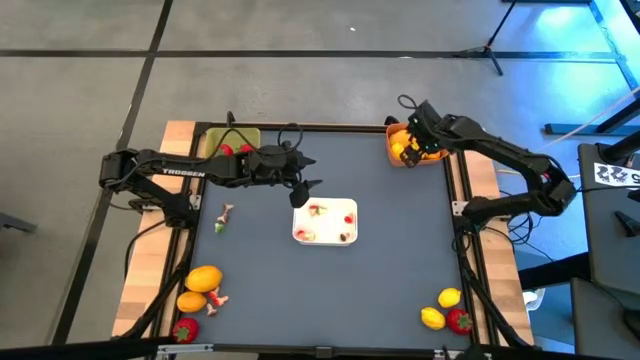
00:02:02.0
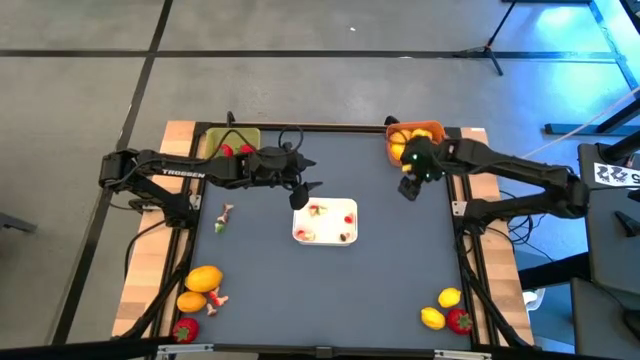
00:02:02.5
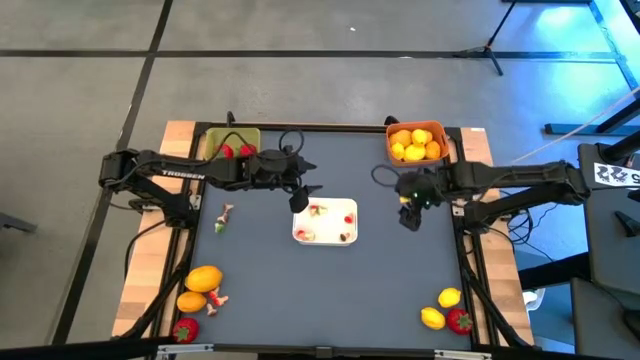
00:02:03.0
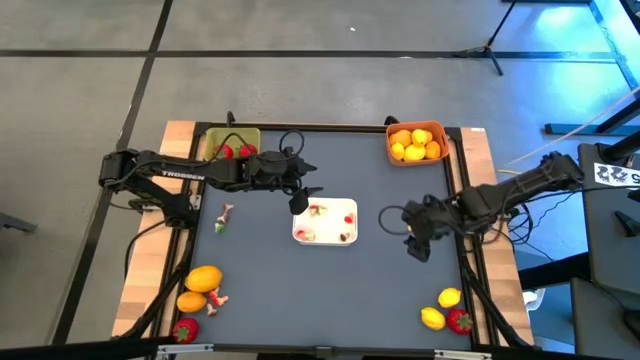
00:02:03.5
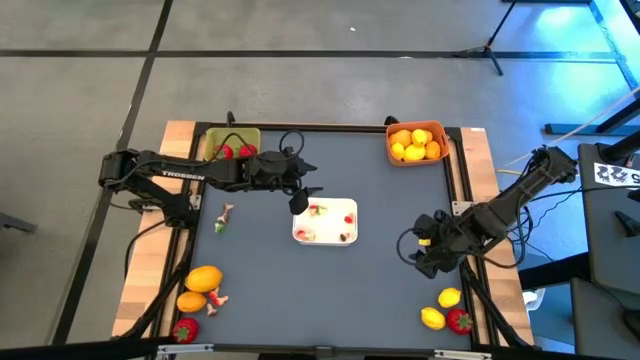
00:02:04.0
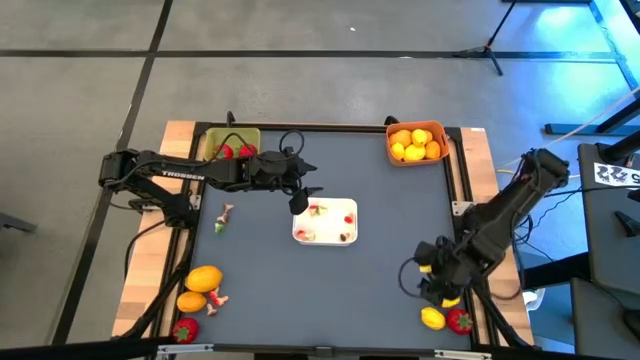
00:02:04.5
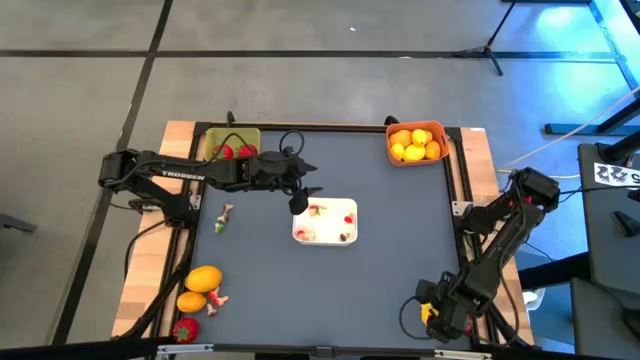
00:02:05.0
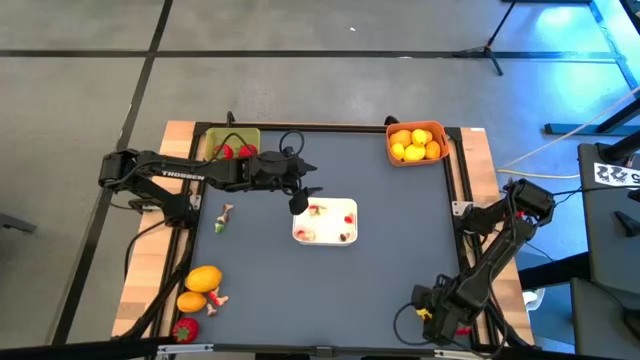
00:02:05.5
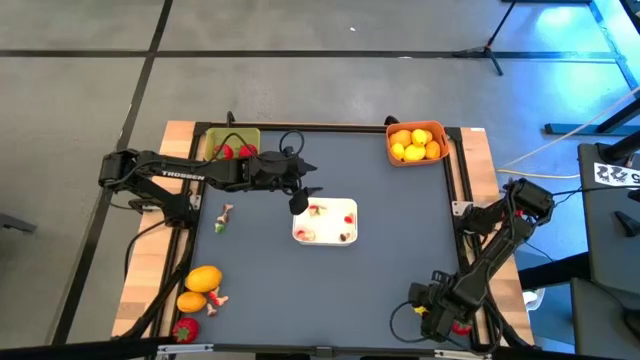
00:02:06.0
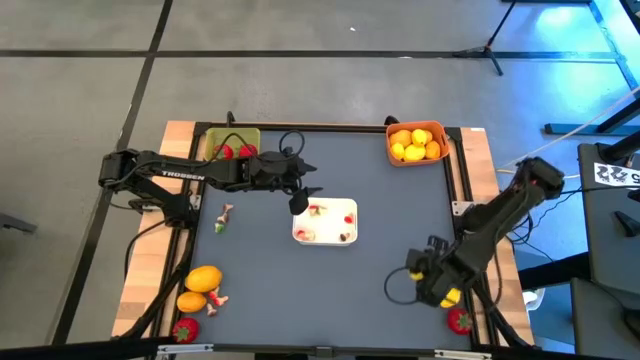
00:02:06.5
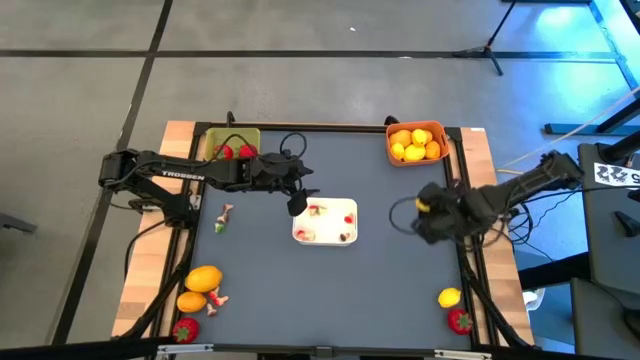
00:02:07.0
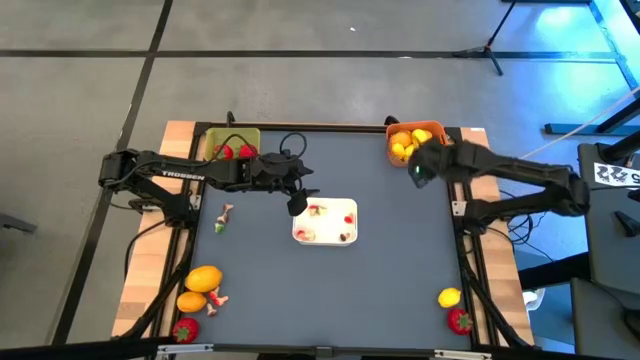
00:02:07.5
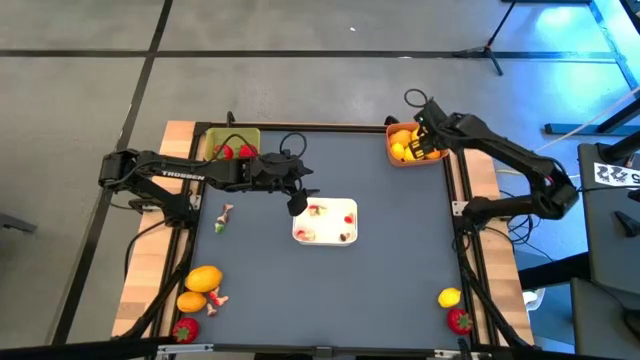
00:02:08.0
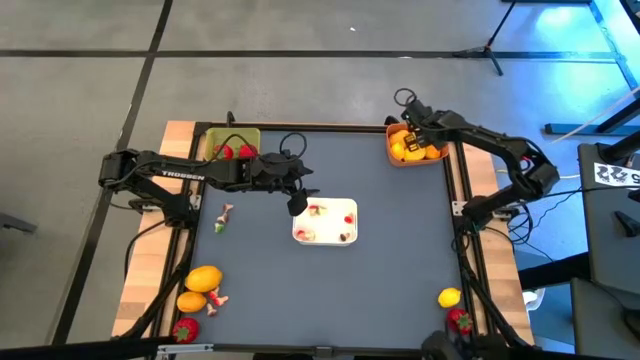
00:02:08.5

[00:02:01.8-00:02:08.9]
Task: Sort produce into baskets
Put the yellow lemon into the orange bin

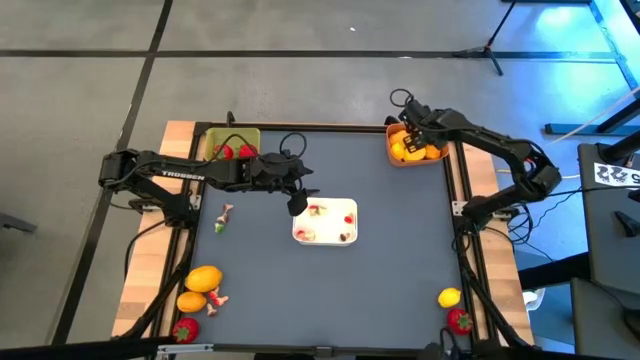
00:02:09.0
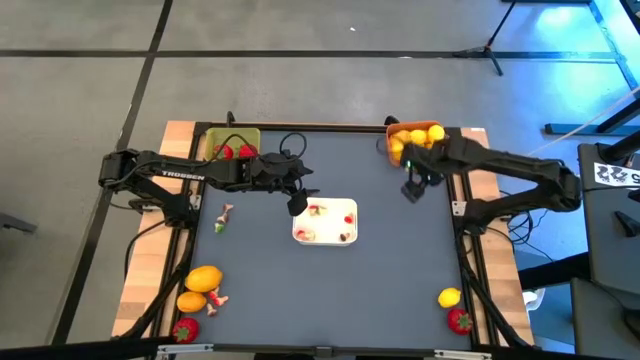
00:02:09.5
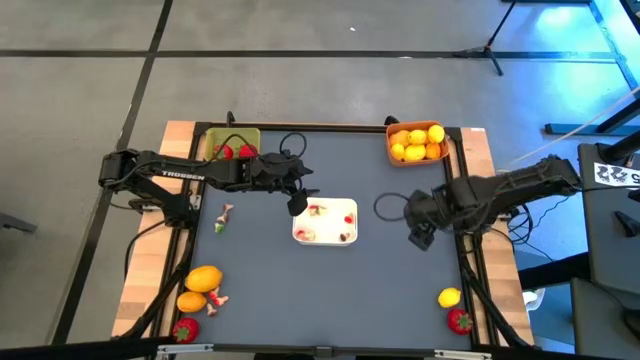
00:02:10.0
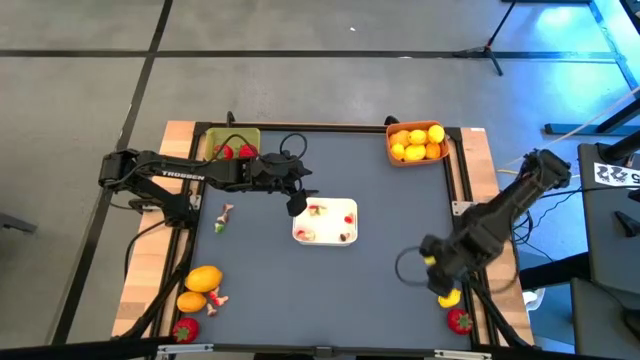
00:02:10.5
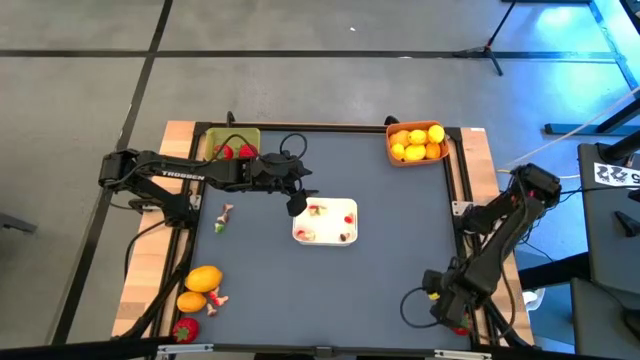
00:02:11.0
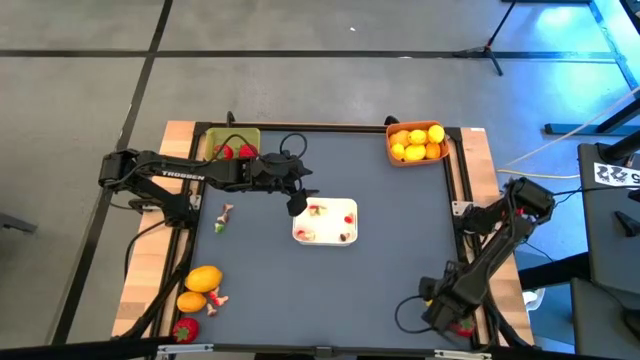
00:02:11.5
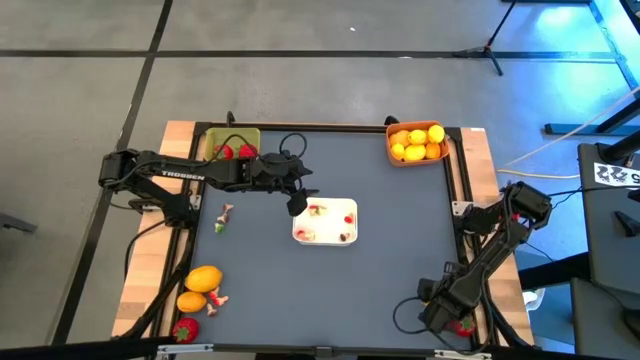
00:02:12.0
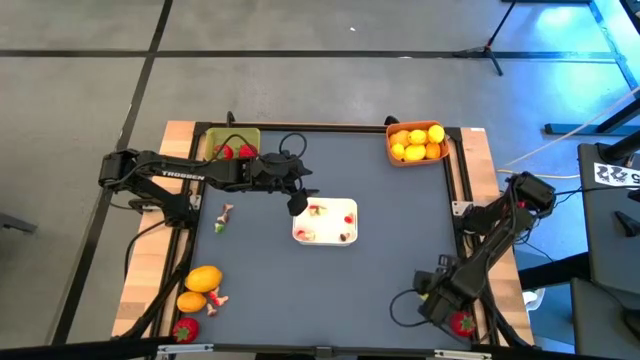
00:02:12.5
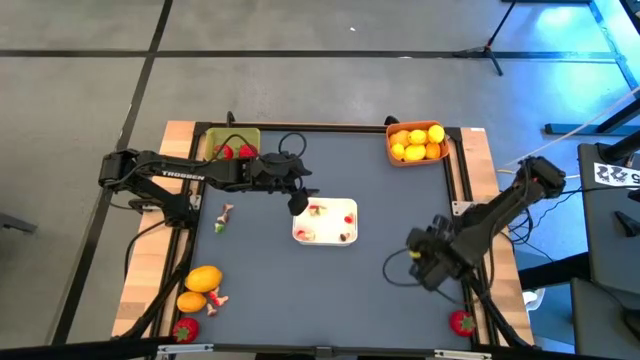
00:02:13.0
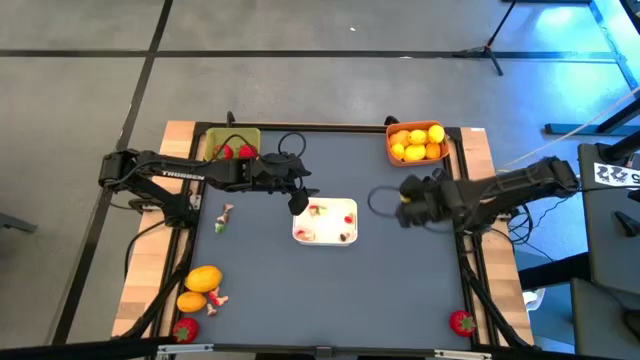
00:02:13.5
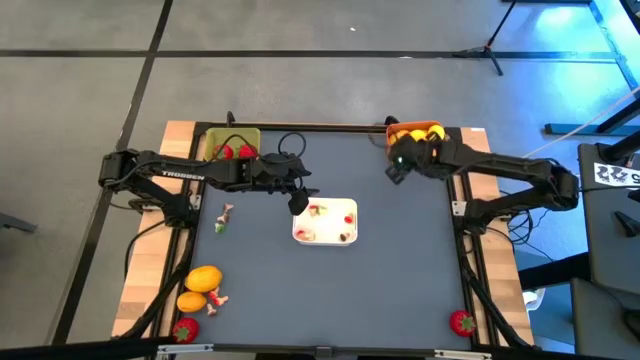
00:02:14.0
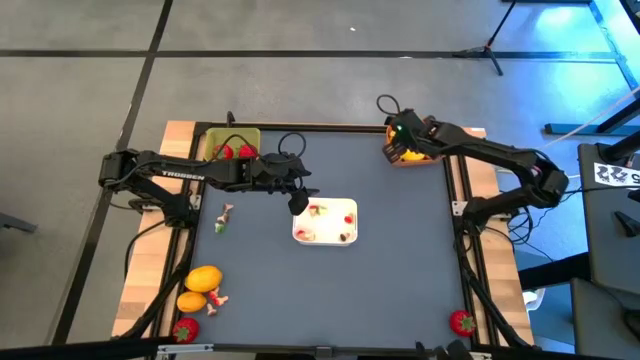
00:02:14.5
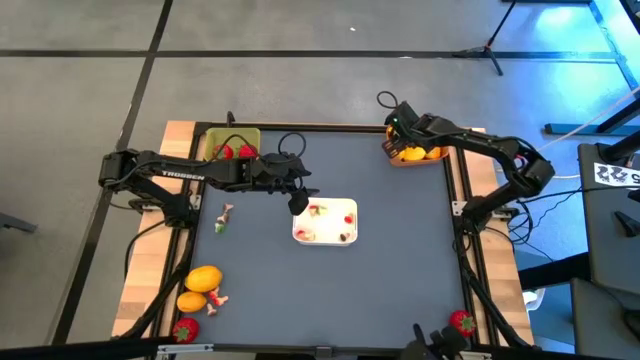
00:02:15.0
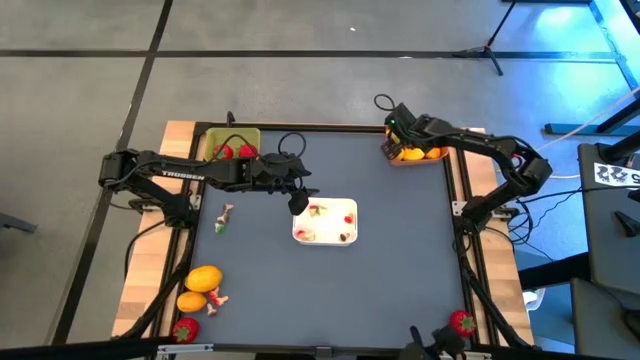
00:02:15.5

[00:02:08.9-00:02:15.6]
Put the yellow lemon into the orange bin

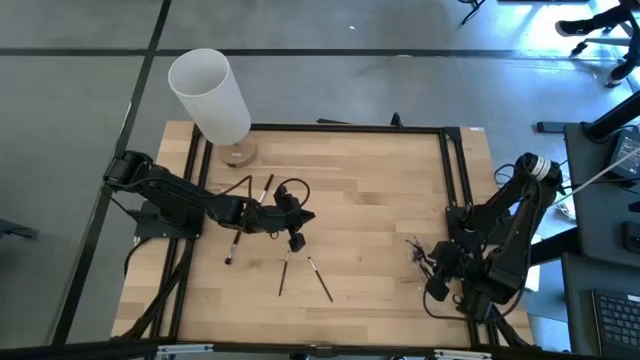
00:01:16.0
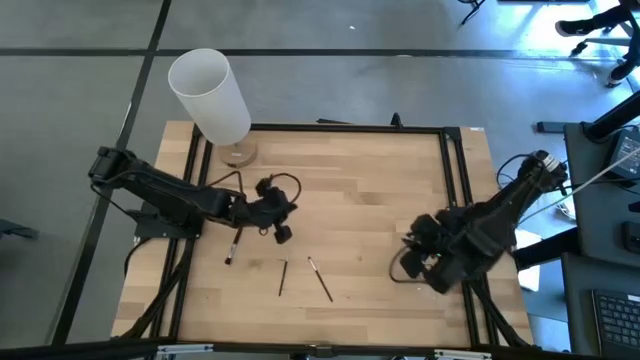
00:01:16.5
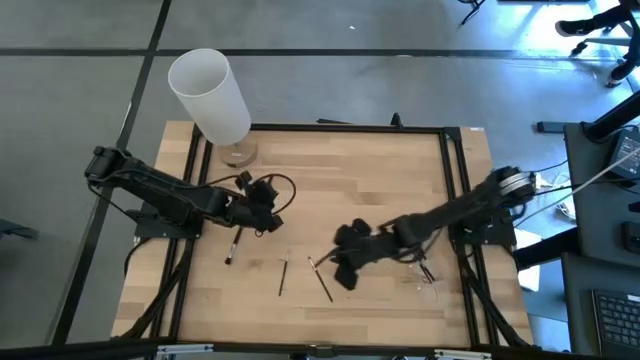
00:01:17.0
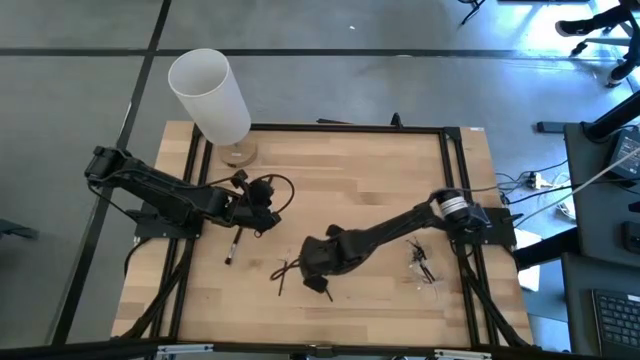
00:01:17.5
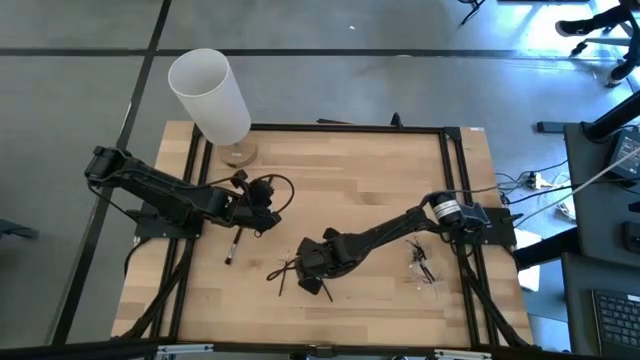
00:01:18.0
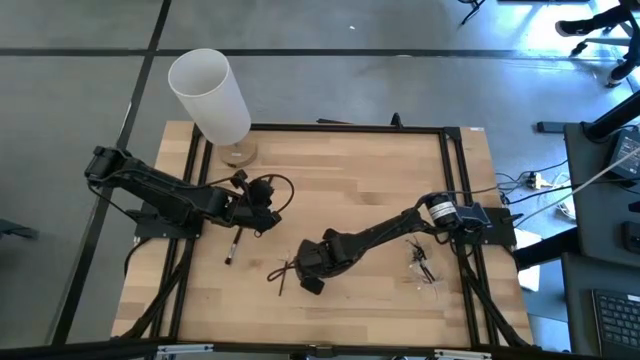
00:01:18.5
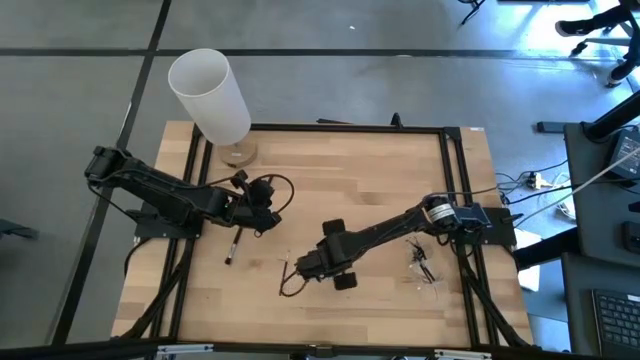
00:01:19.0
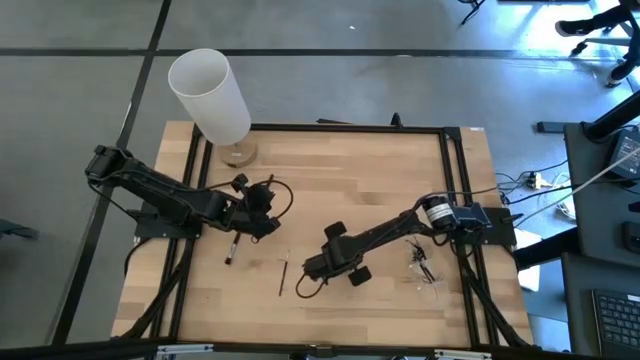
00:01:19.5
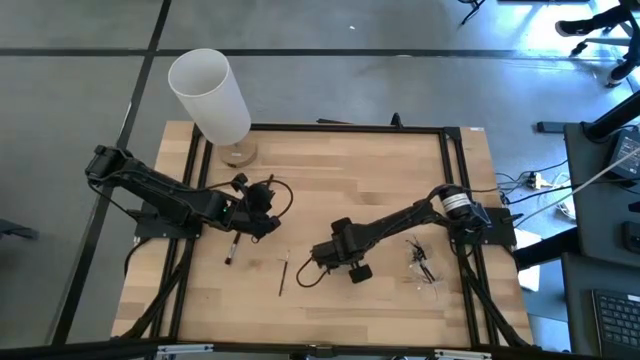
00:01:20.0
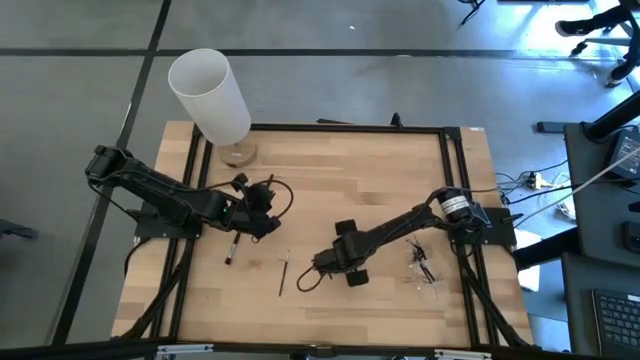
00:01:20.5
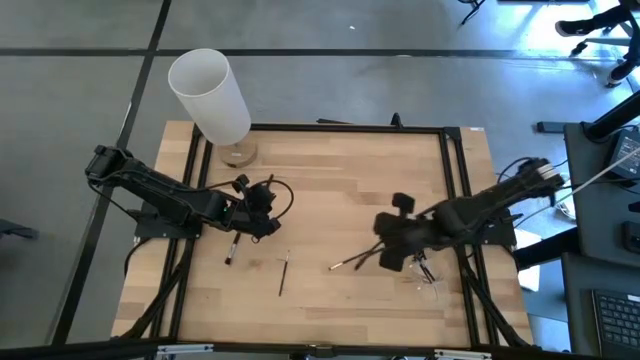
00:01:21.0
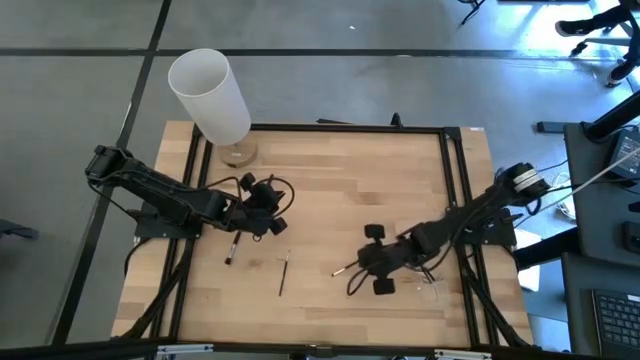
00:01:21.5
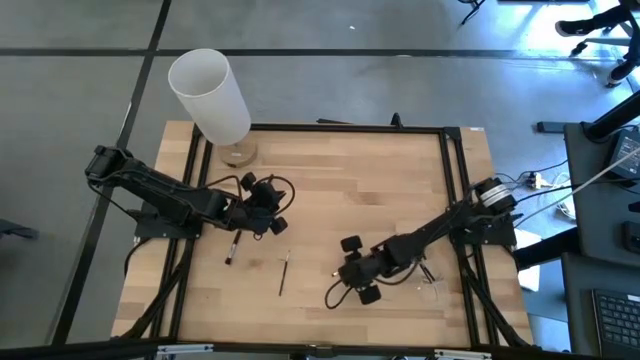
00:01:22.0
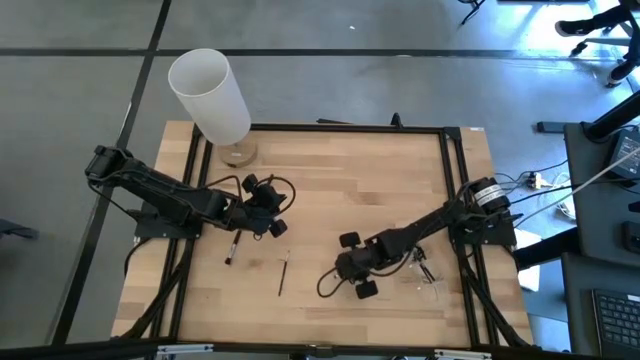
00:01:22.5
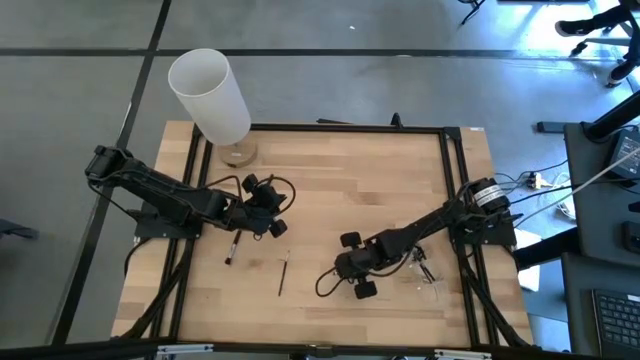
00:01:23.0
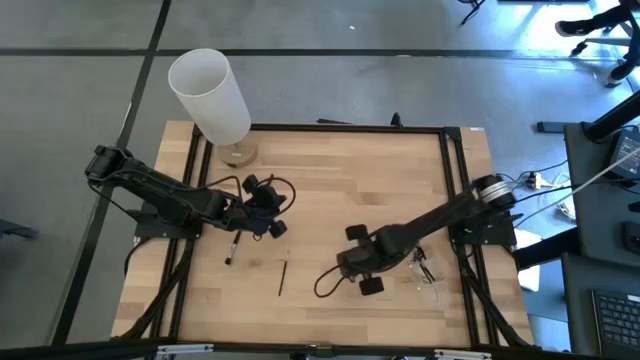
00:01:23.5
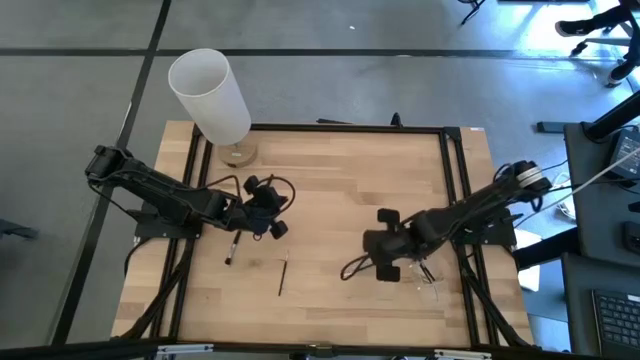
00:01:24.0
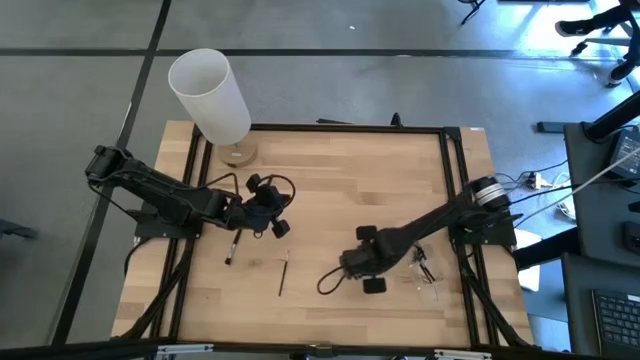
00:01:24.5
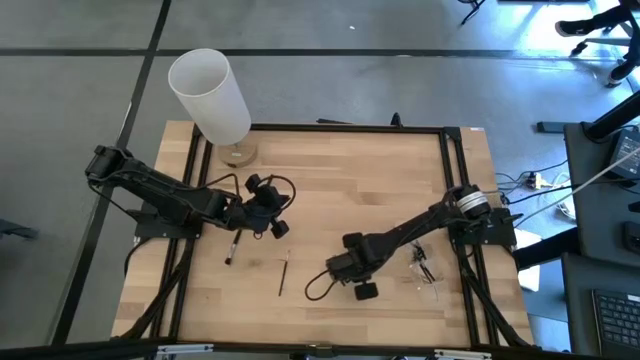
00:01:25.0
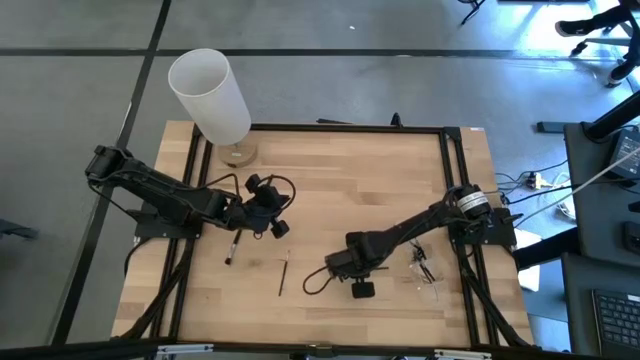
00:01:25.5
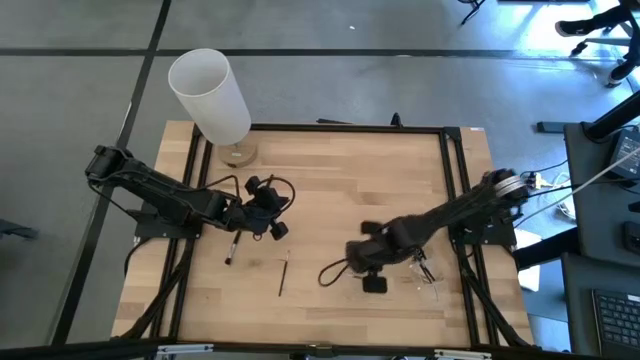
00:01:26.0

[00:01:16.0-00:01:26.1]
Task: Put items in baskets/containers
Put the black eyeshadow brush into the transparent organizer
